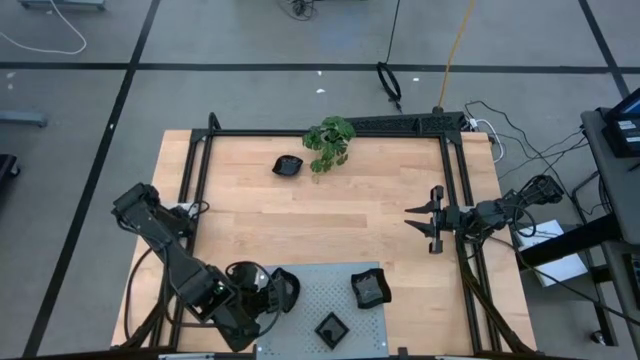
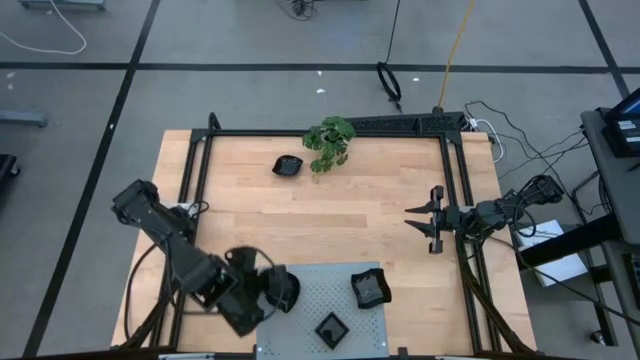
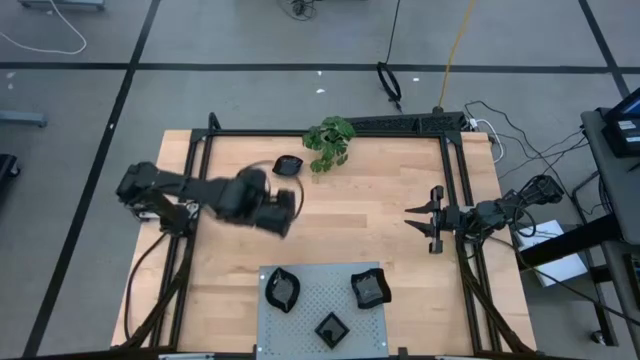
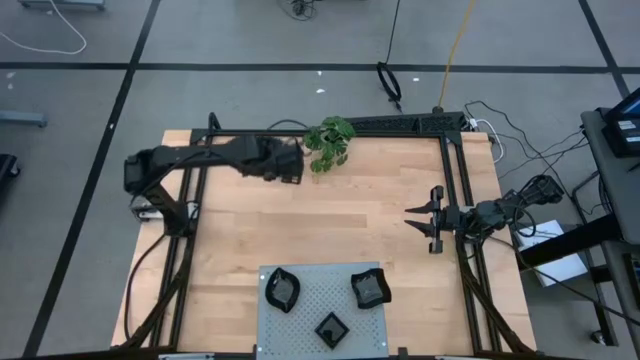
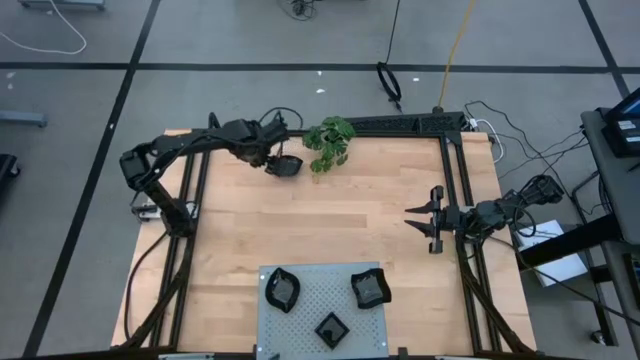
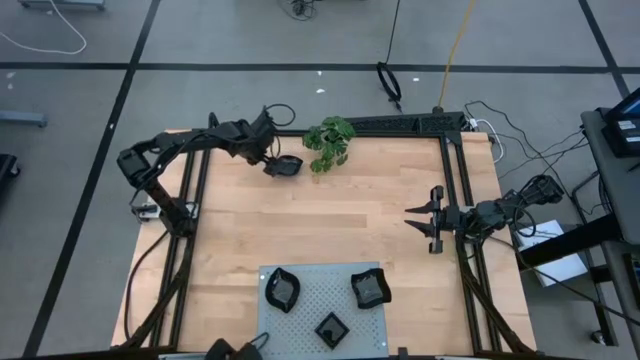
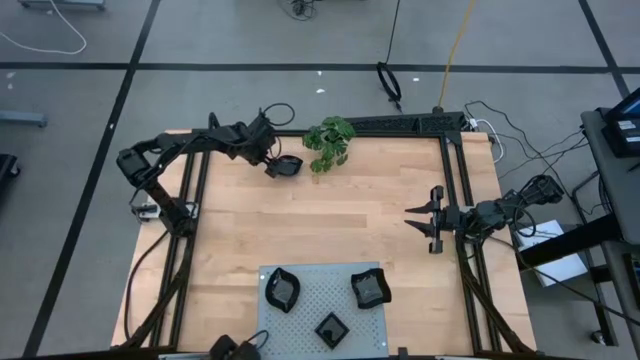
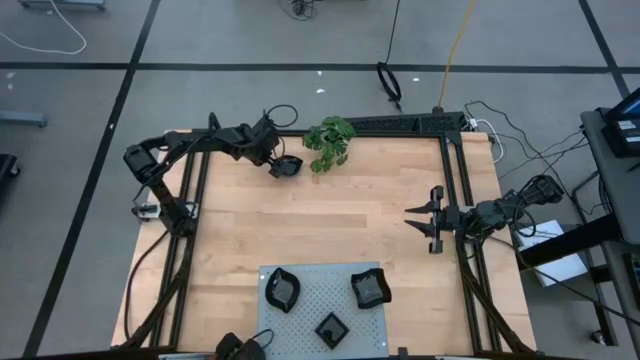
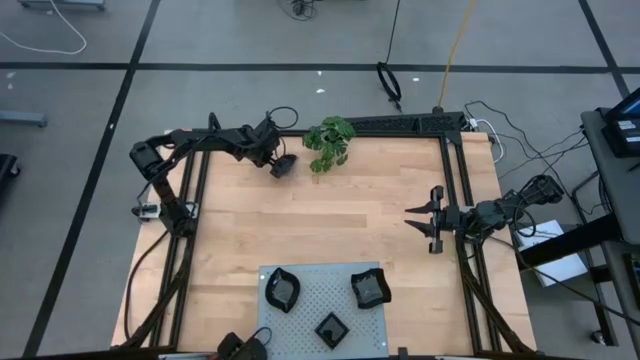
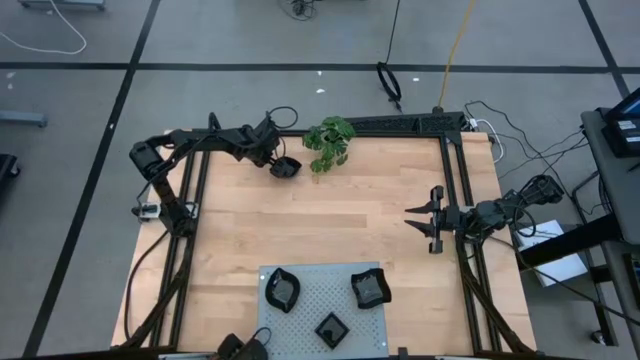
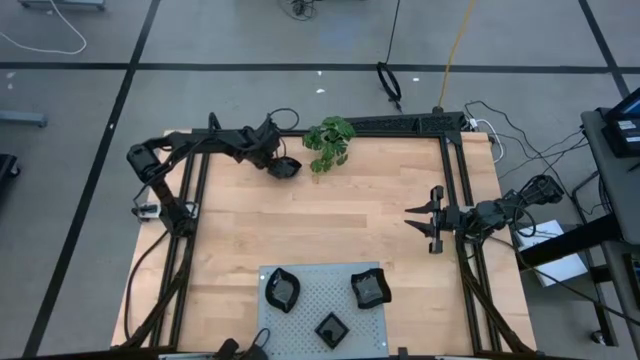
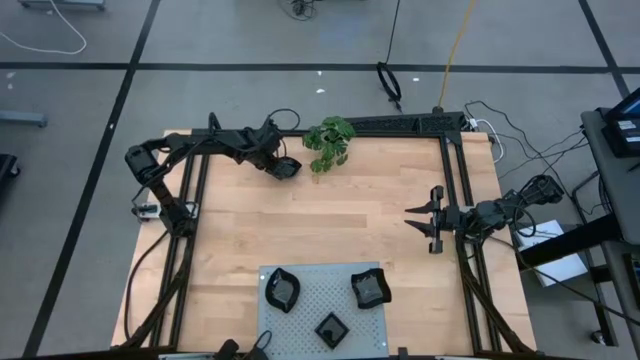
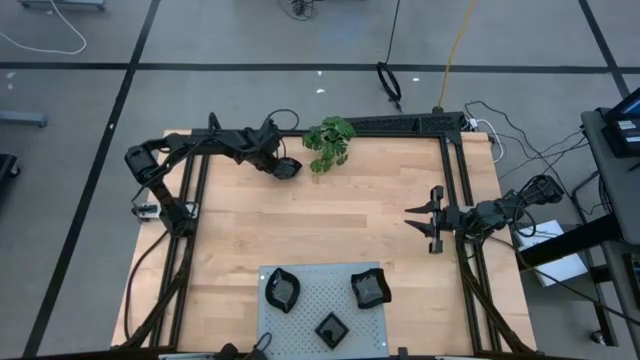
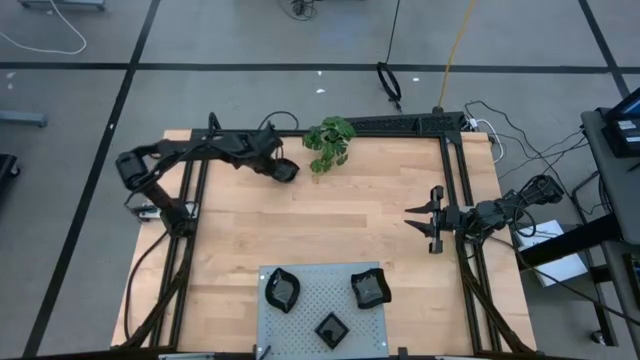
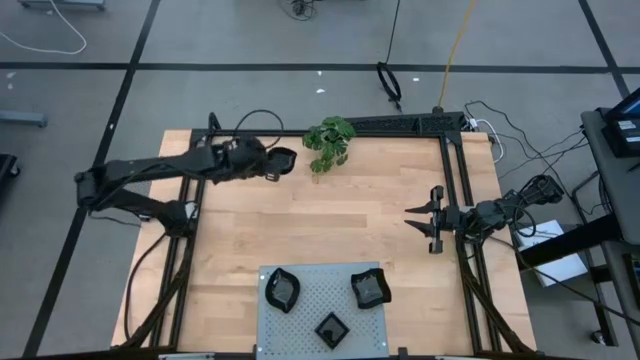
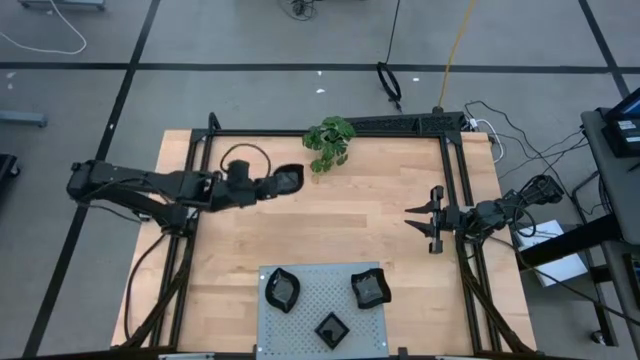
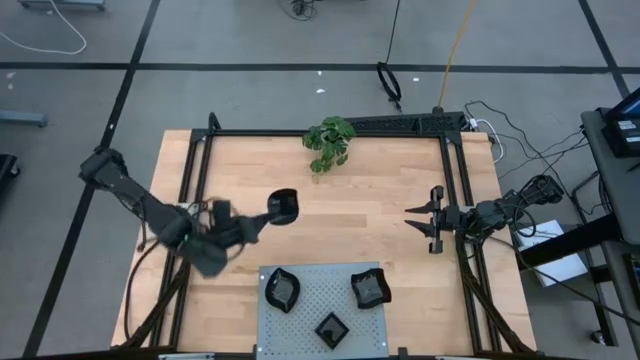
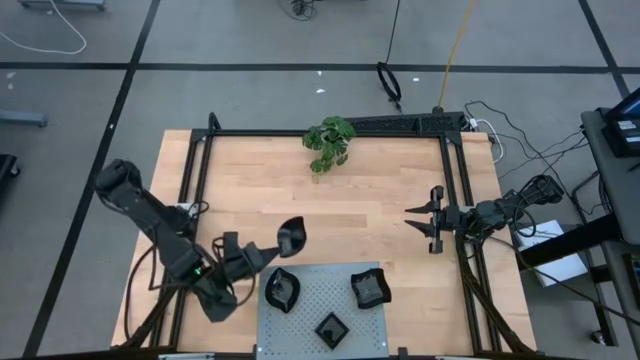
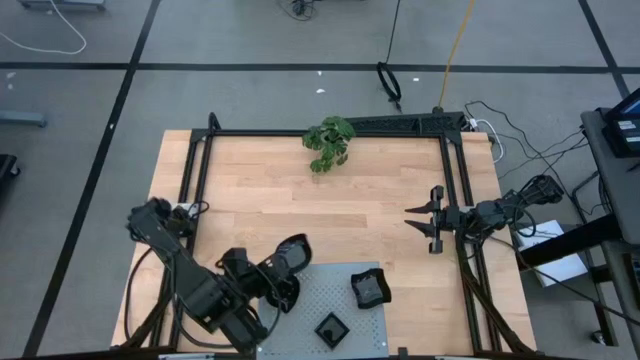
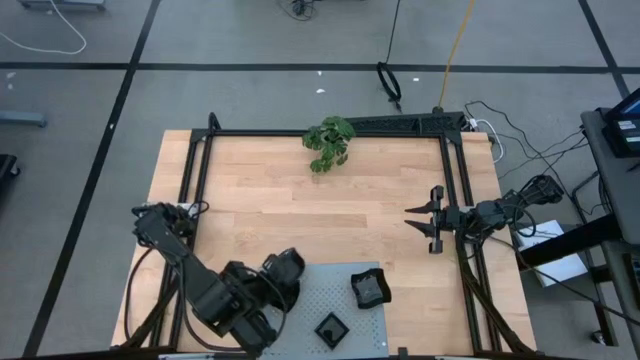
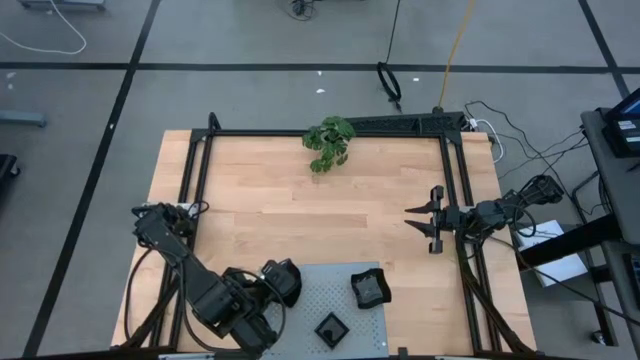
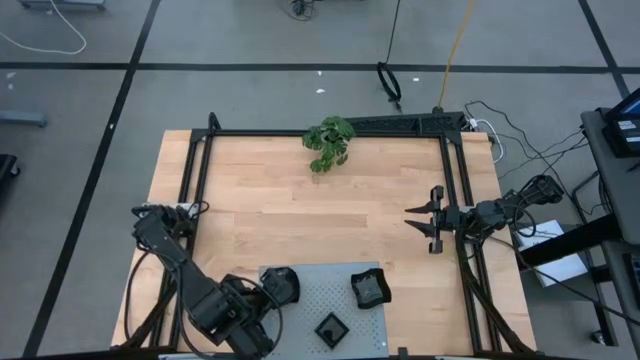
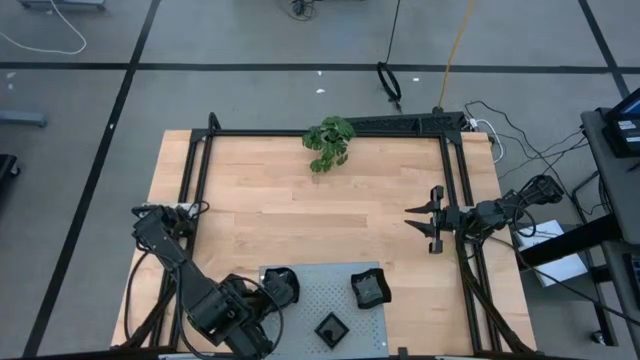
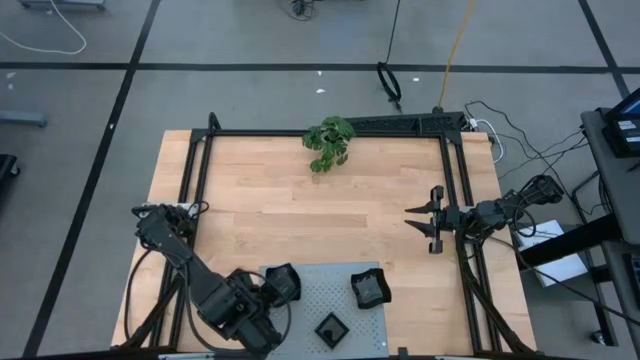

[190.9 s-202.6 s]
Task: Pick & Place Mini shaped plates
Stack the leaf-shaped plate onto the stacked leaf-shaped plate on the shelf

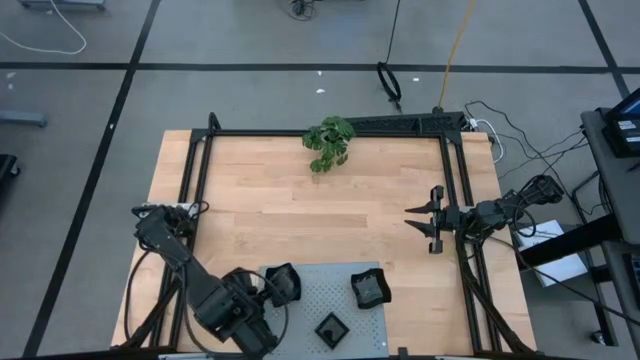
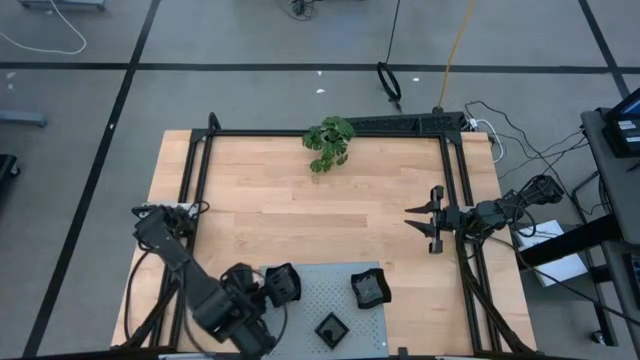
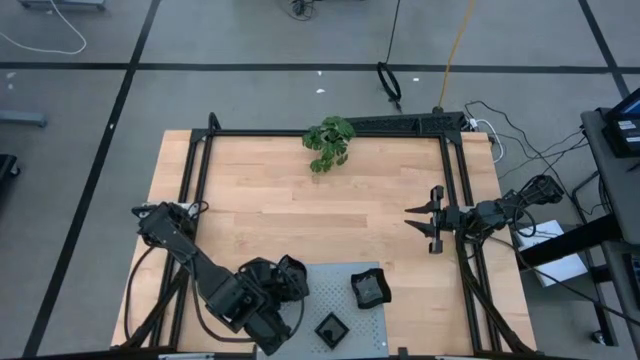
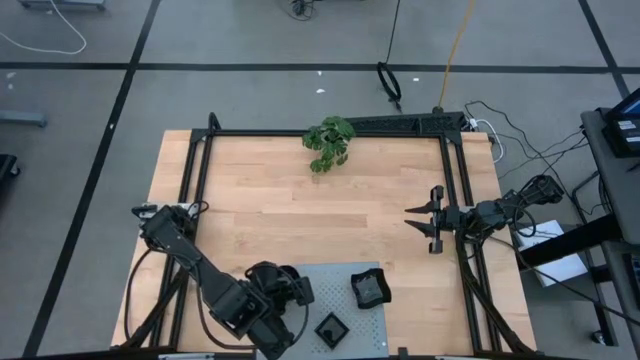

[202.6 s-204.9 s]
Adjust the stacked leaf-shaped plate on the shelf

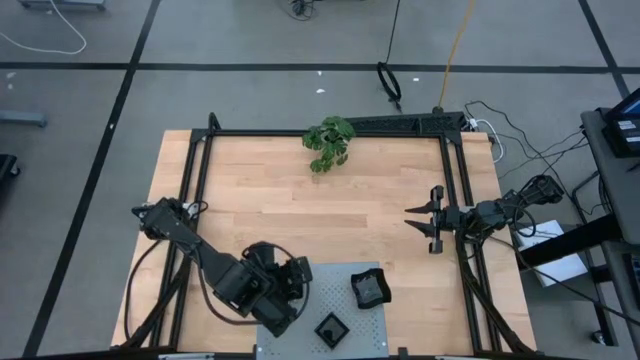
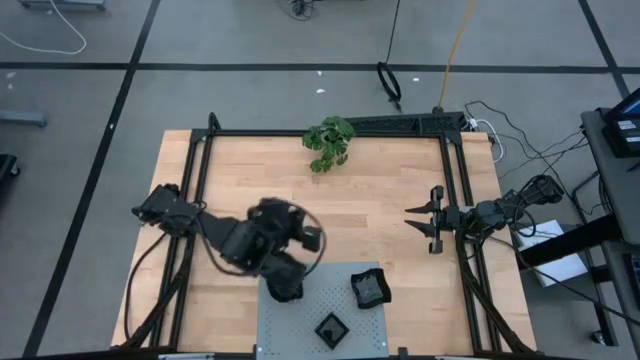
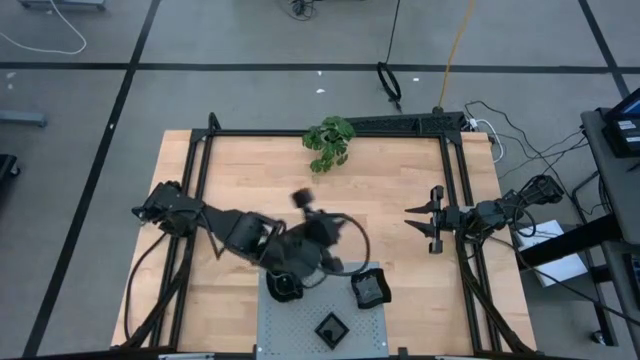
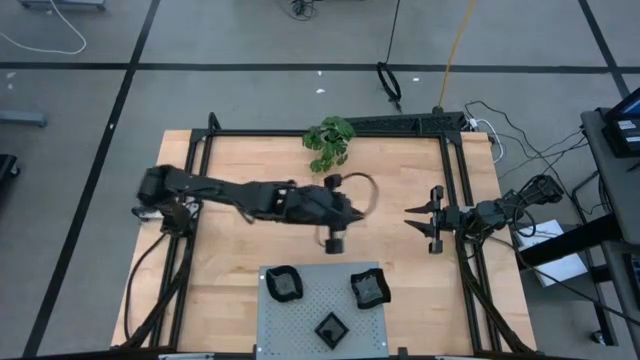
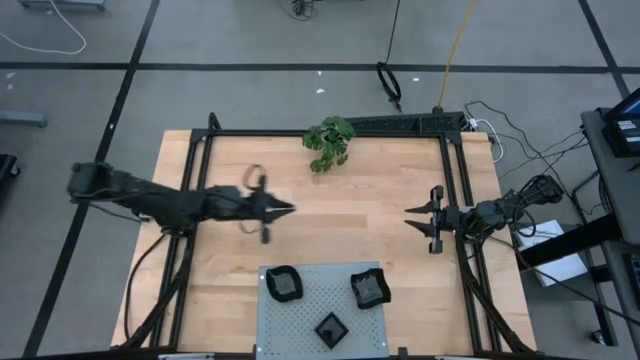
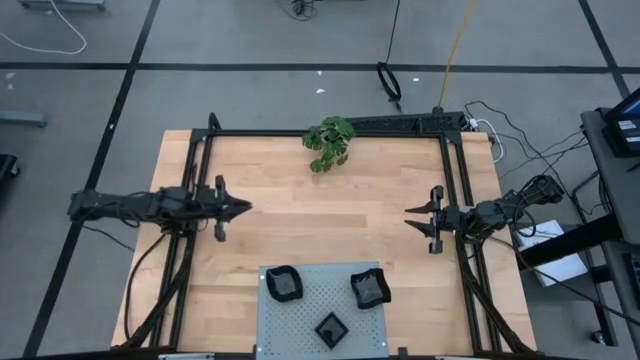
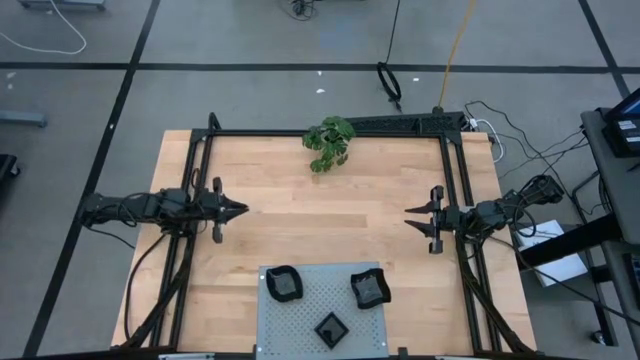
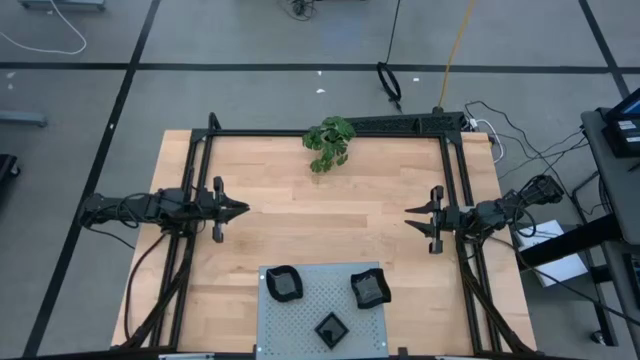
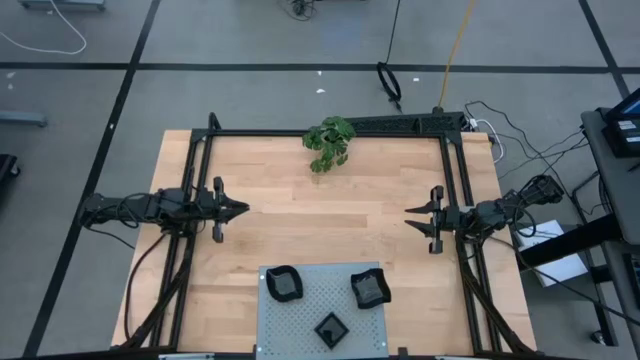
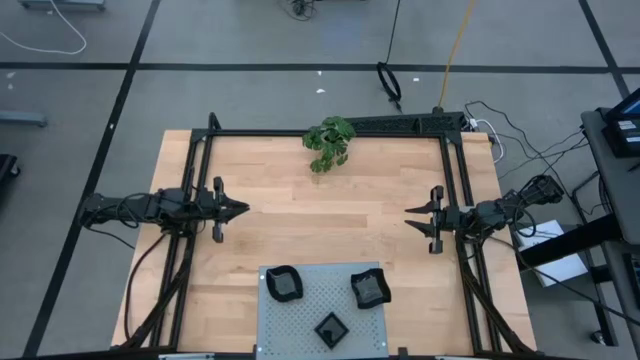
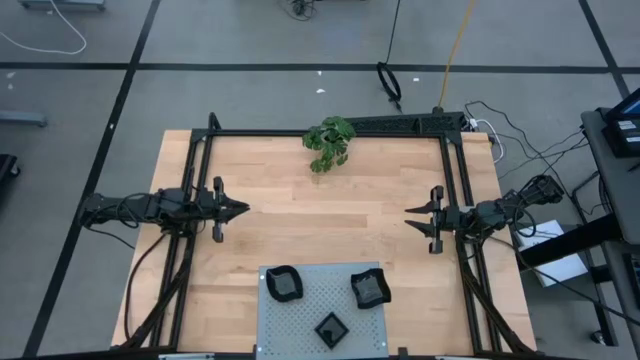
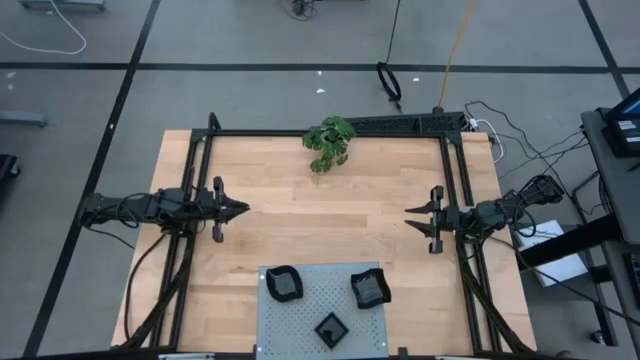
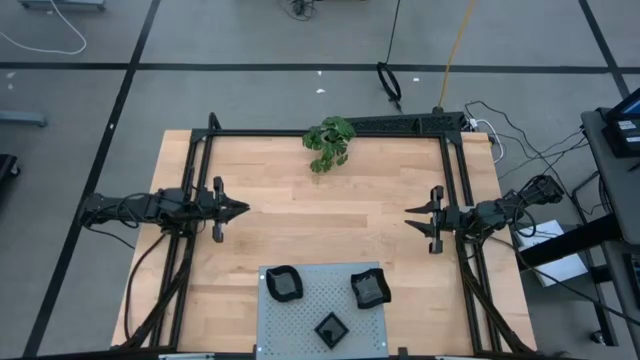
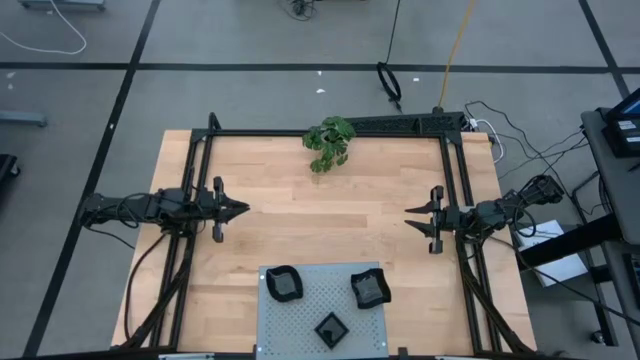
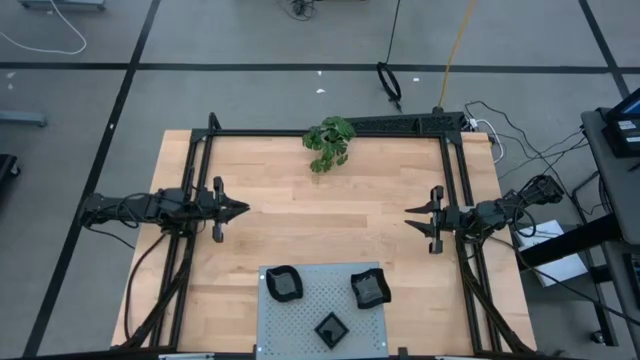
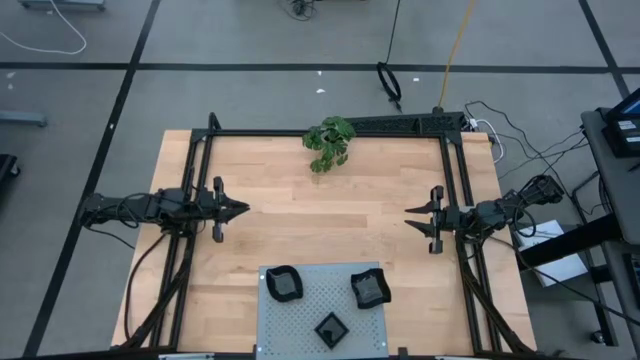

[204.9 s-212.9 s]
Return to Home Position
